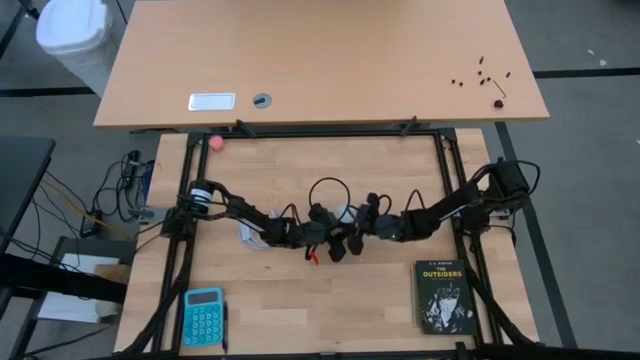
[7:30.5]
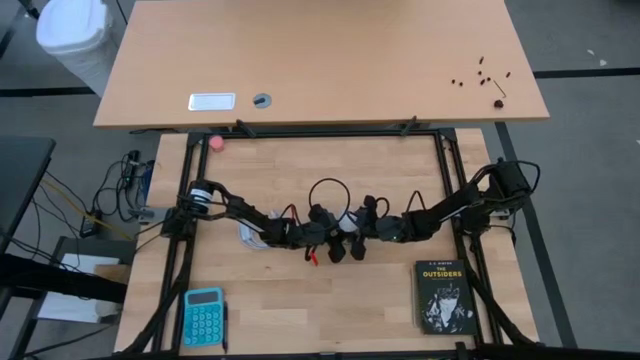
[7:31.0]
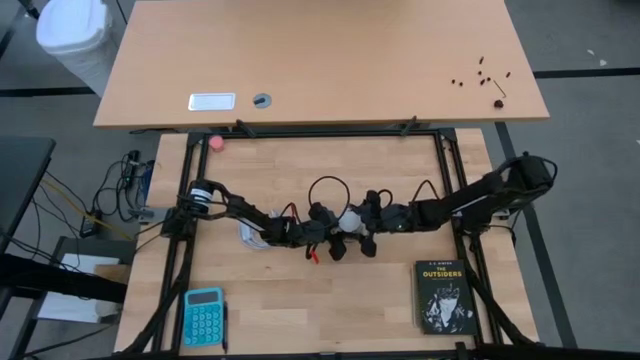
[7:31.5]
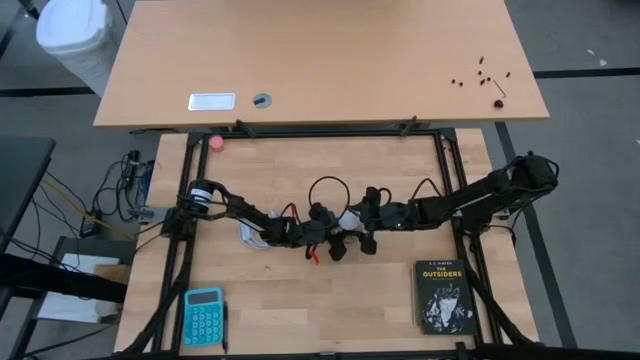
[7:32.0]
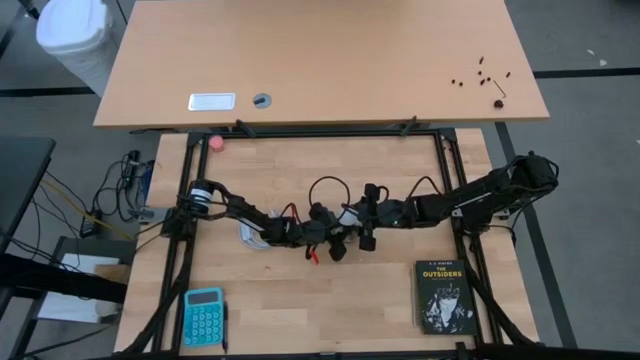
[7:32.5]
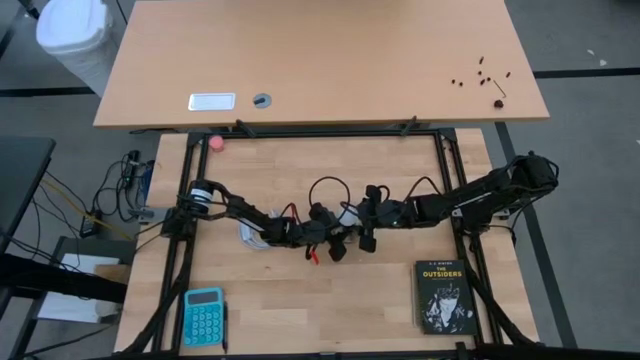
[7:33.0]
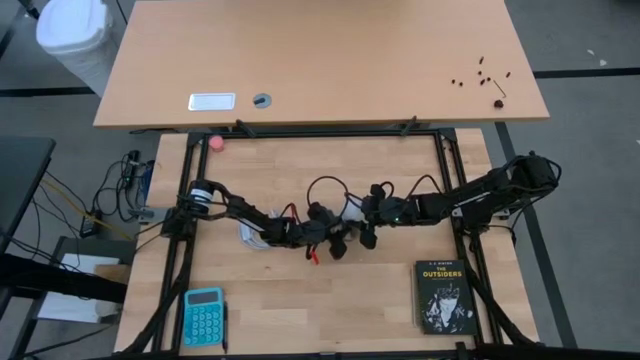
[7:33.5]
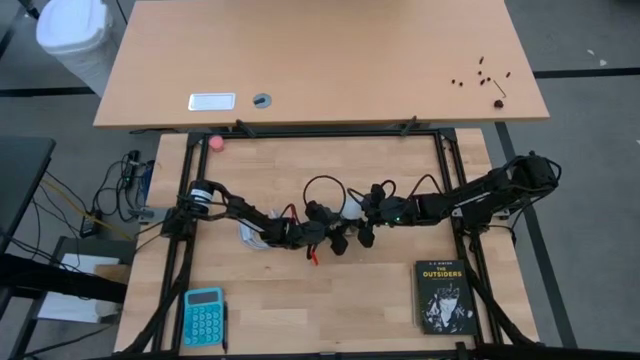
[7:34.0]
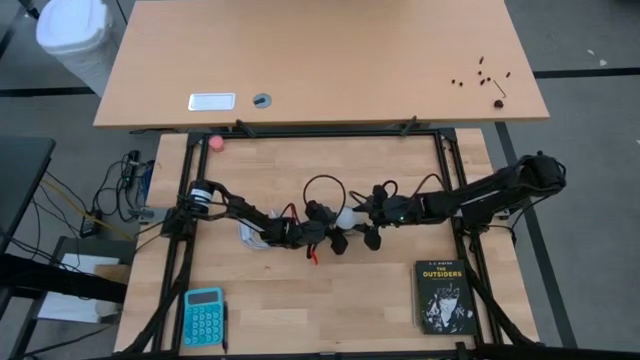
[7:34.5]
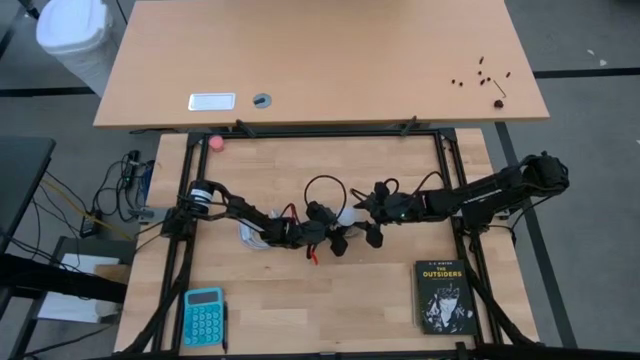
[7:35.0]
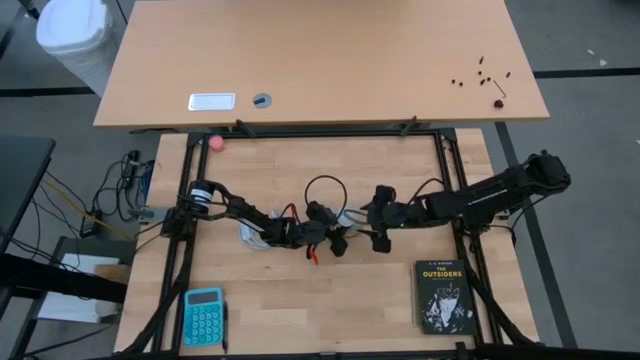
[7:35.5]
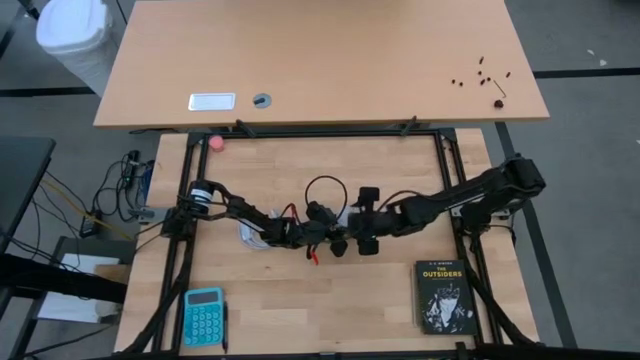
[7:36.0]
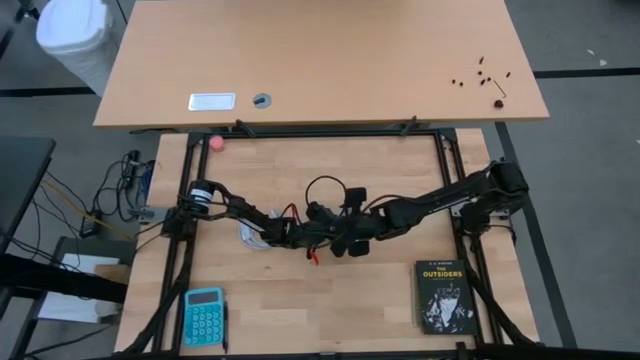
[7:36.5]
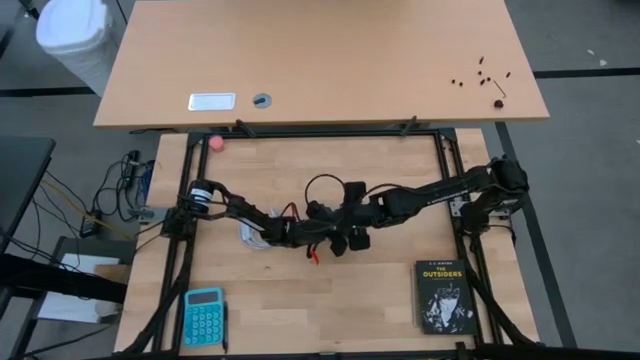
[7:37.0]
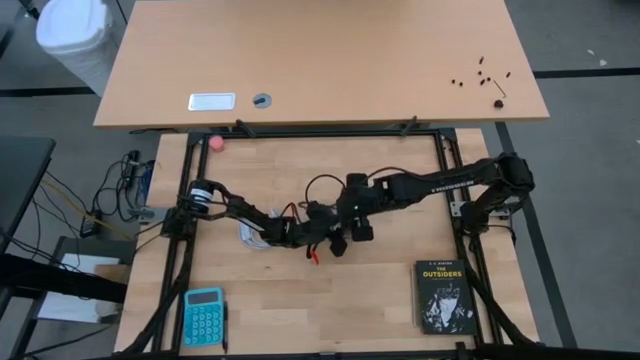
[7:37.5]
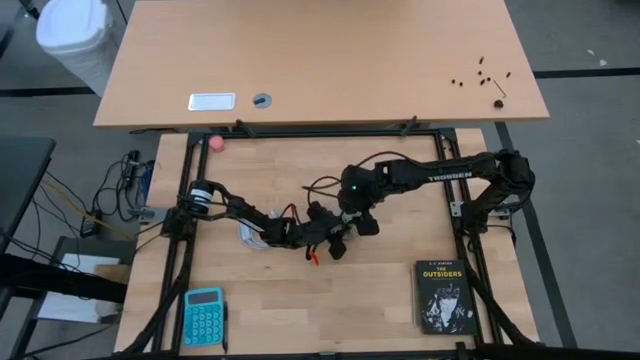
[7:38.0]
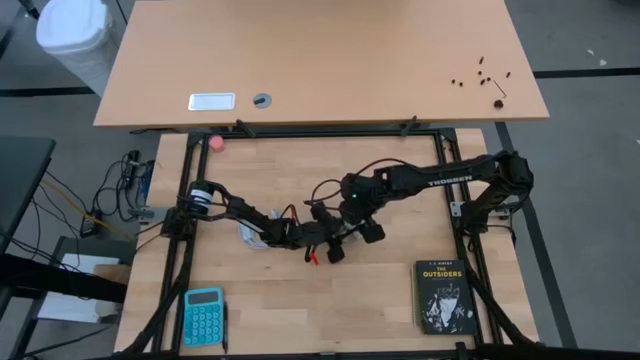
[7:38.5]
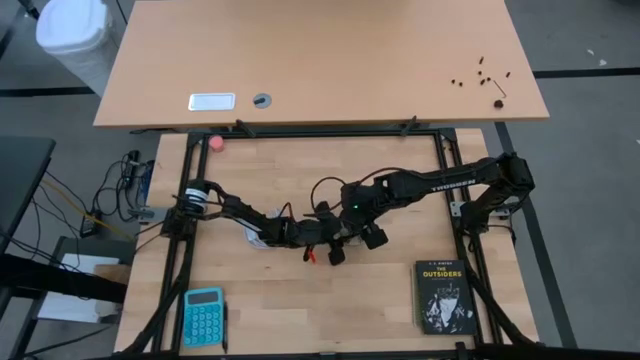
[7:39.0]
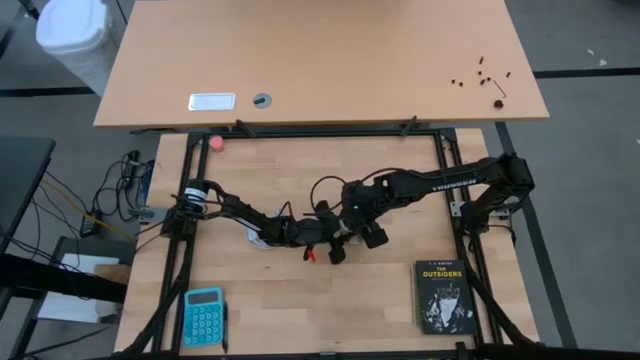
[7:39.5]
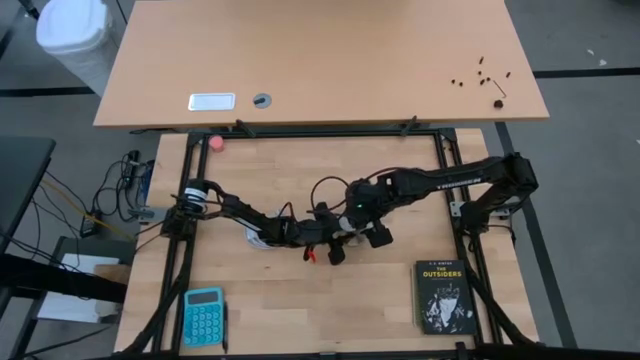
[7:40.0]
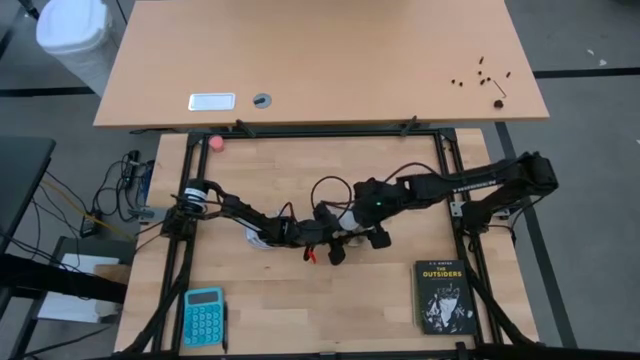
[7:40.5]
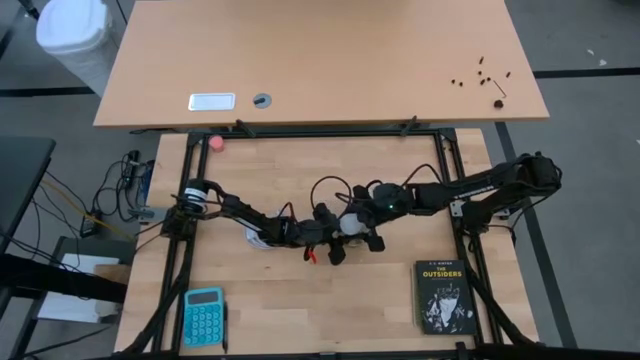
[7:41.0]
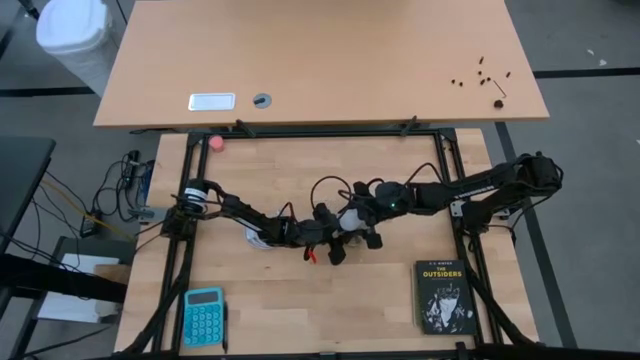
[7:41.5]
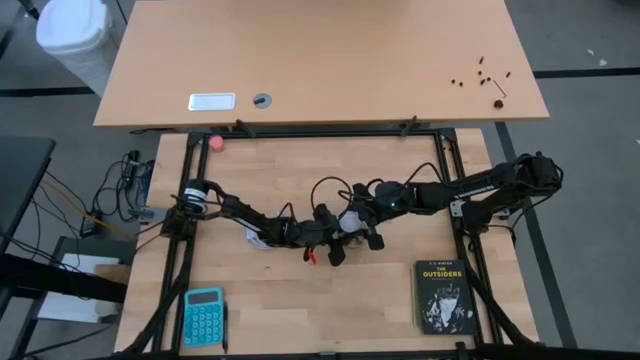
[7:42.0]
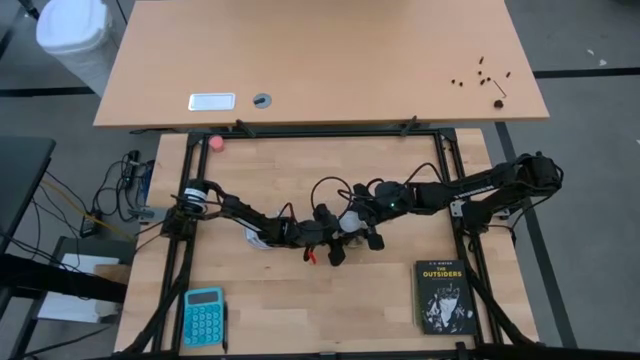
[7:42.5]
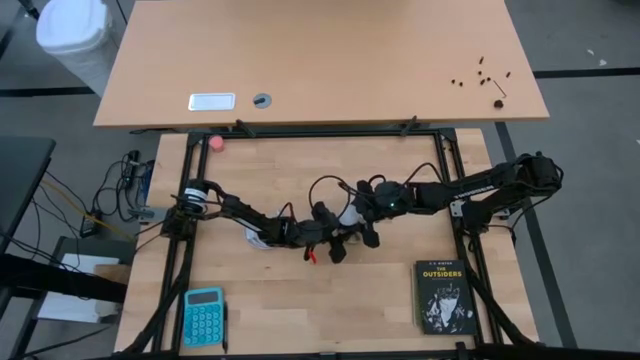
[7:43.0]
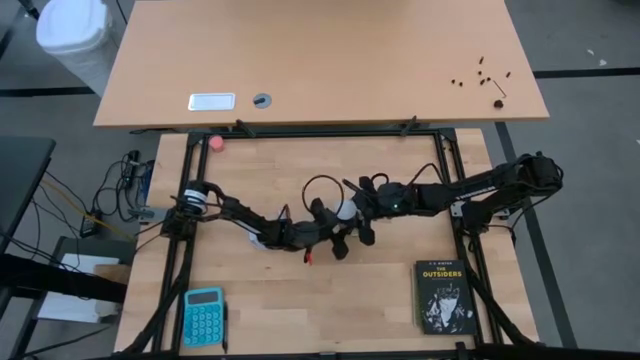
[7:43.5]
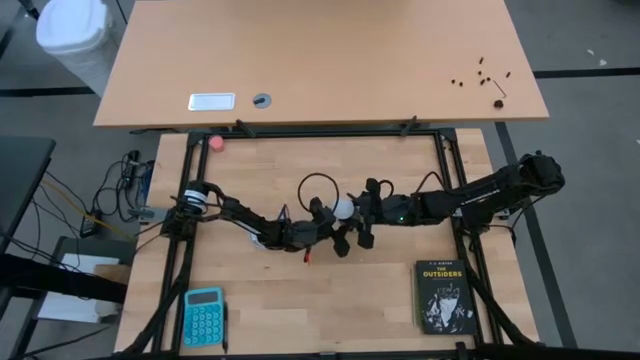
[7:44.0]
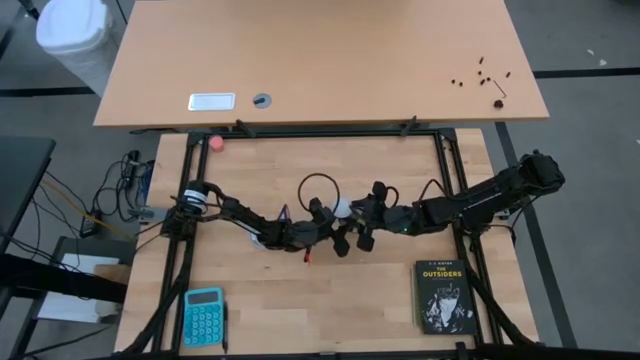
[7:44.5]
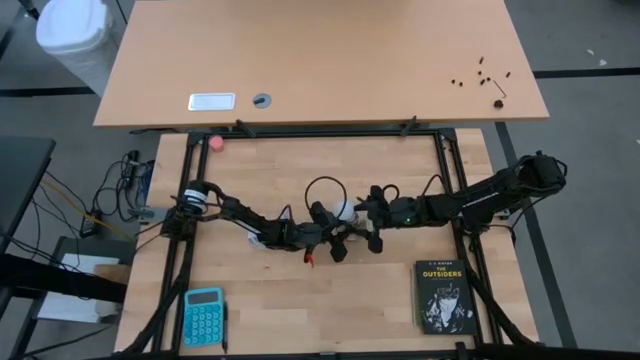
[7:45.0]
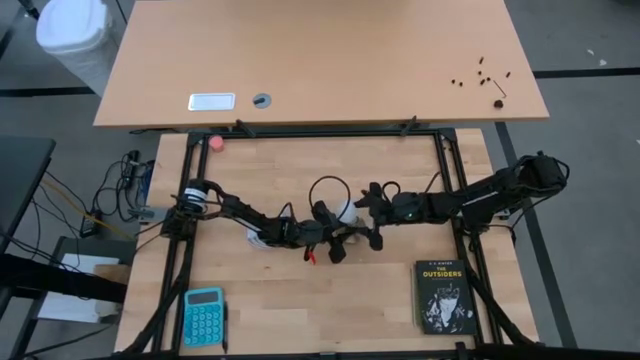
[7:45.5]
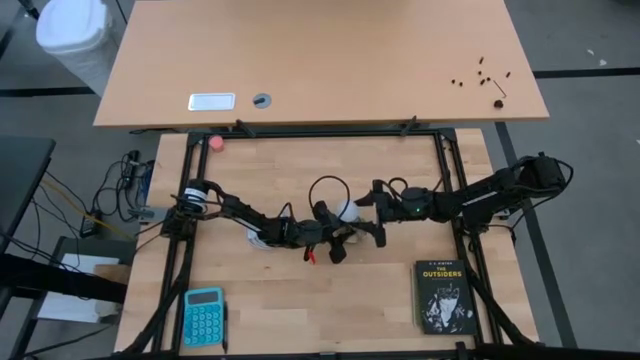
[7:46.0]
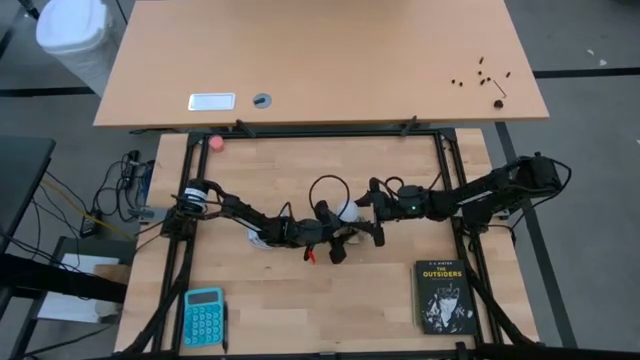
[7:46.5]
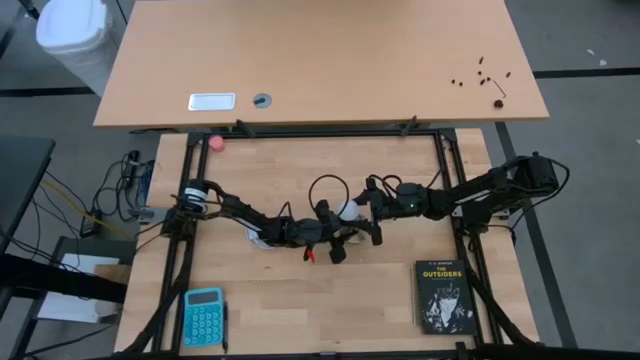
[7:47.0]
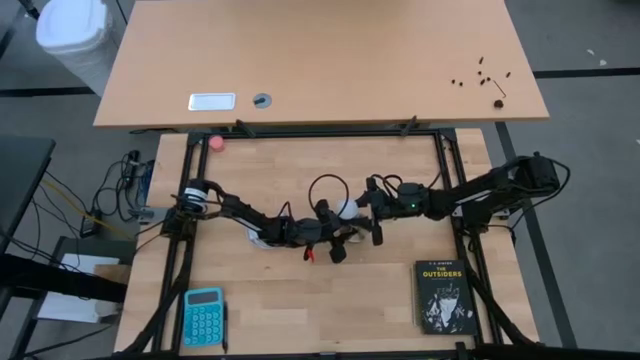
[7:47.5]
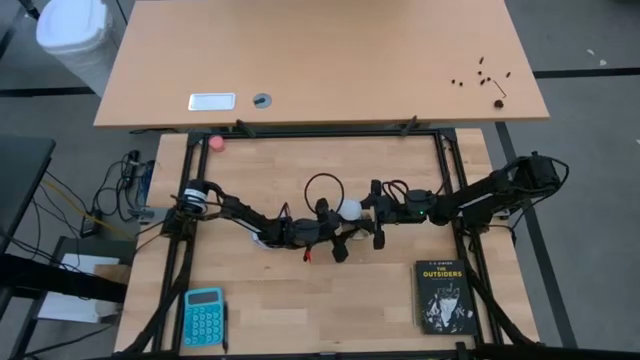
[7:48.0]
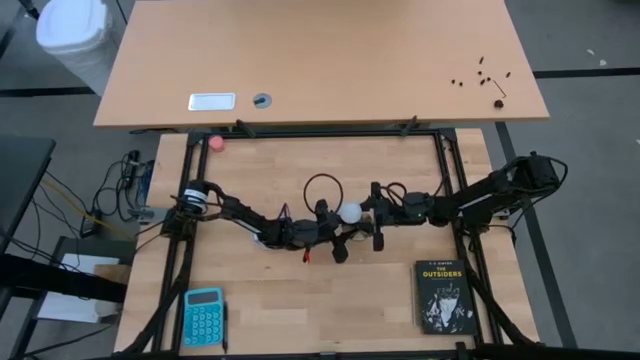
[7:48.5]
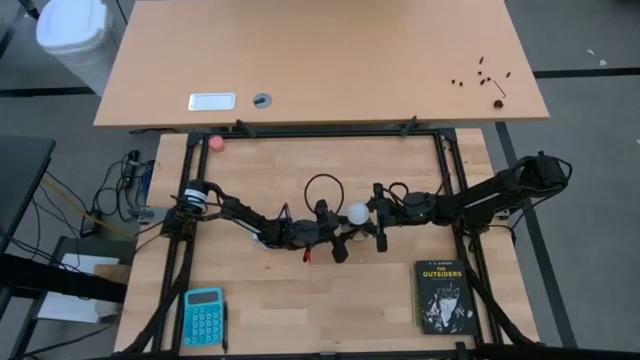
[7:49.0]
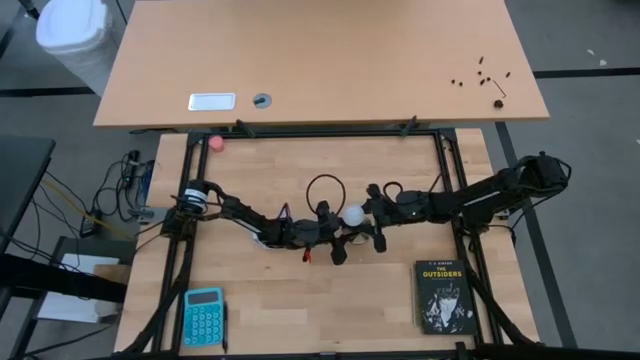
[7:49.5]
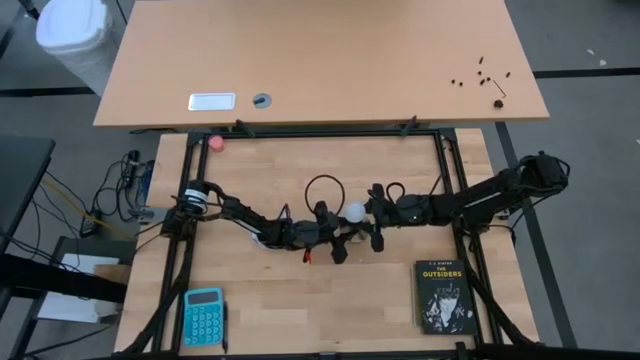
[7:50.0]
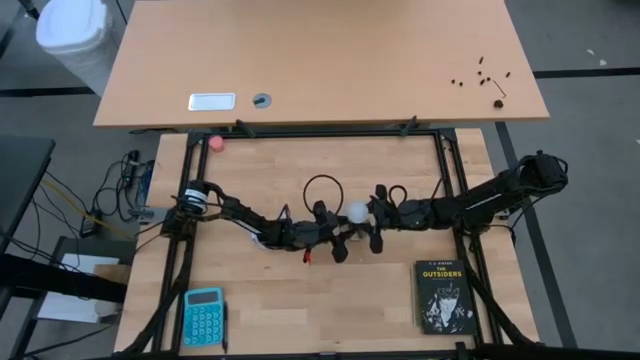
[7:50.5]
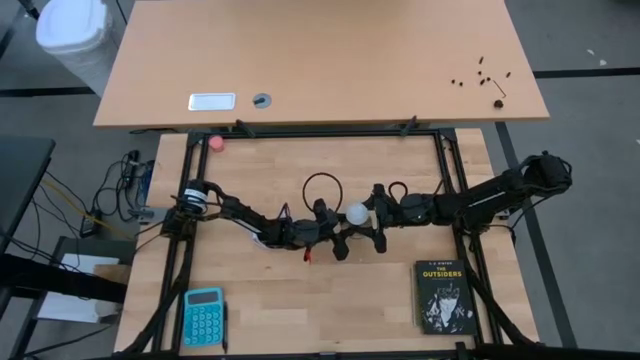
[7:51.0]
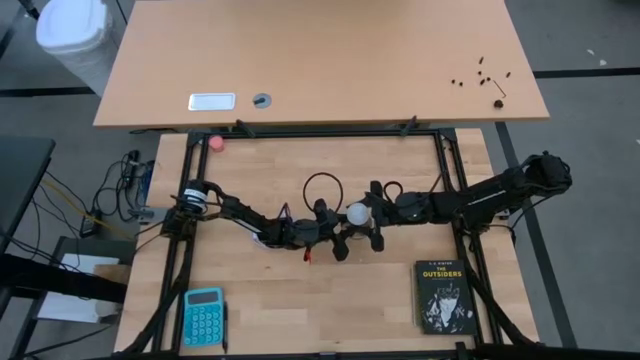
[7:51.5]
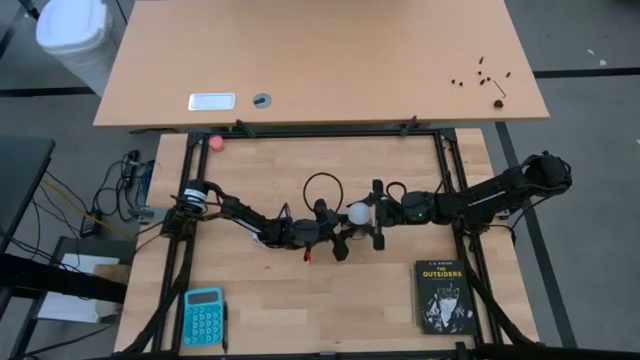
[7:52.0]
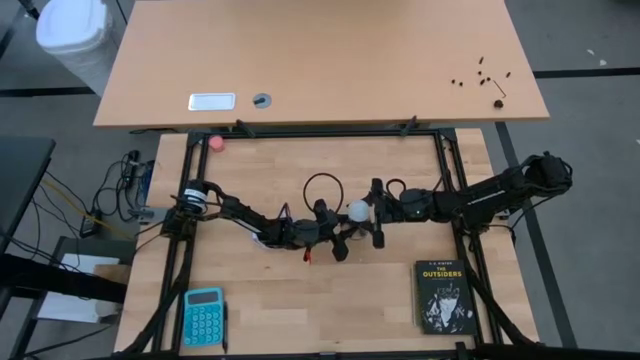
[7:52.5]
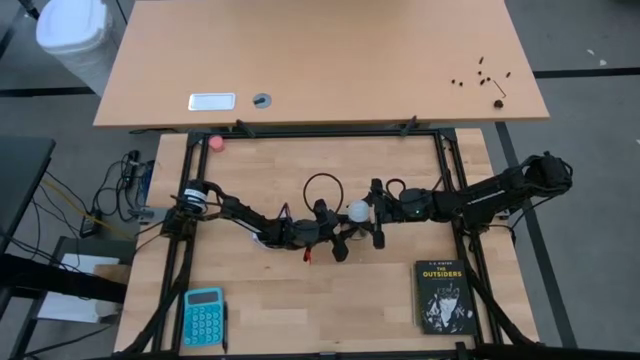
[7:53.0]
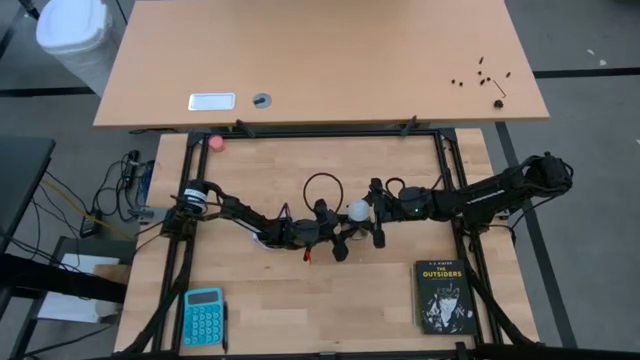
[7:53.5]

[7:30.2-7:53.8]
Task: Screw lightbulb
Insert the white lightbulb into the silver lamp
